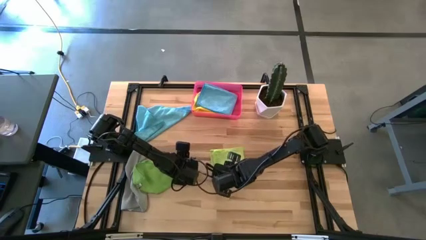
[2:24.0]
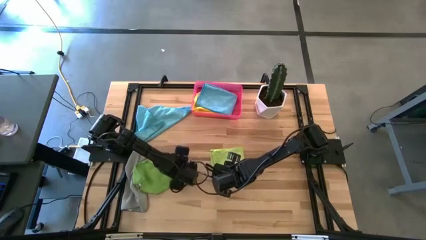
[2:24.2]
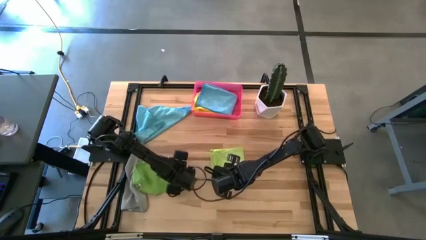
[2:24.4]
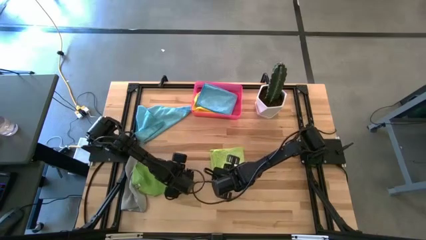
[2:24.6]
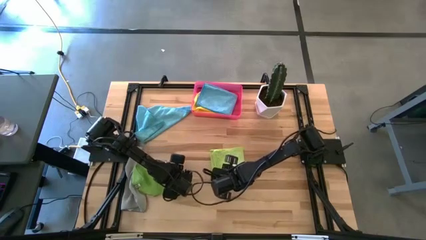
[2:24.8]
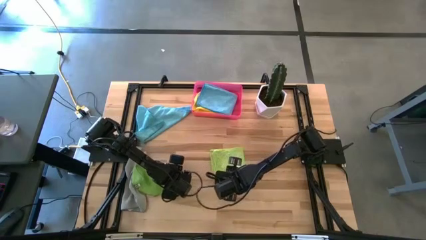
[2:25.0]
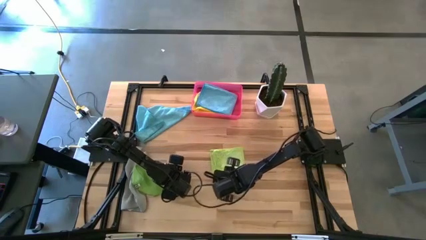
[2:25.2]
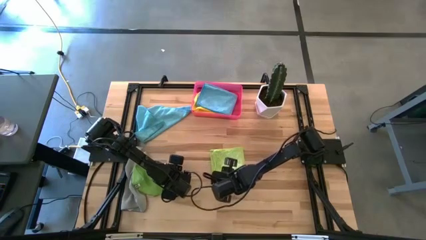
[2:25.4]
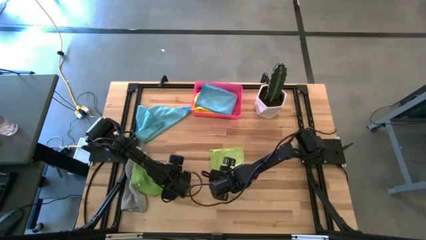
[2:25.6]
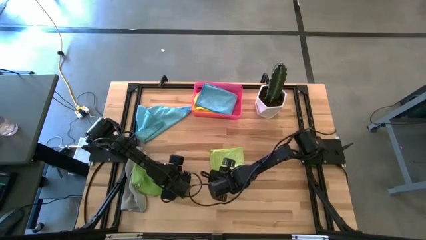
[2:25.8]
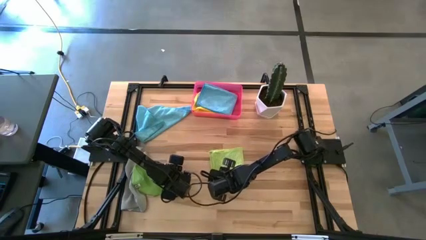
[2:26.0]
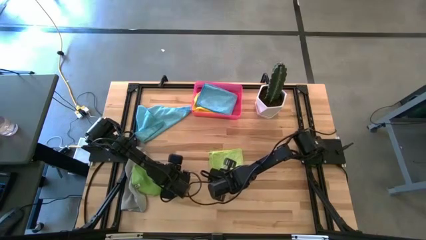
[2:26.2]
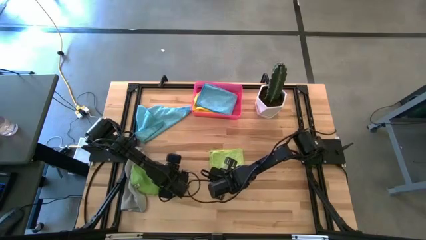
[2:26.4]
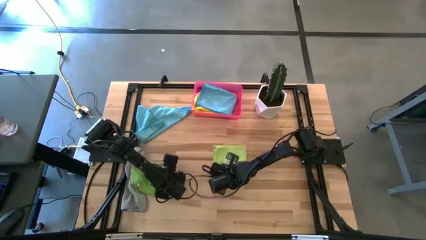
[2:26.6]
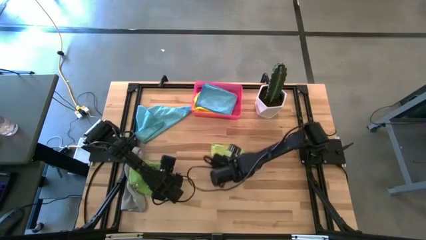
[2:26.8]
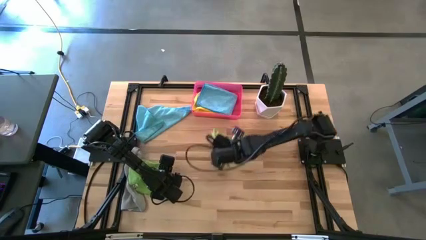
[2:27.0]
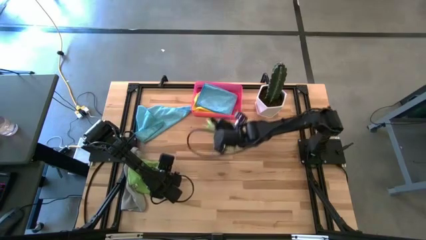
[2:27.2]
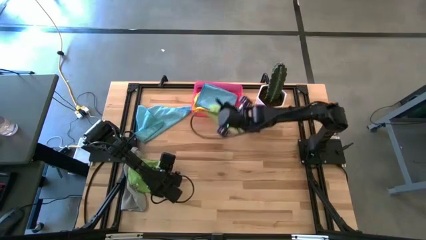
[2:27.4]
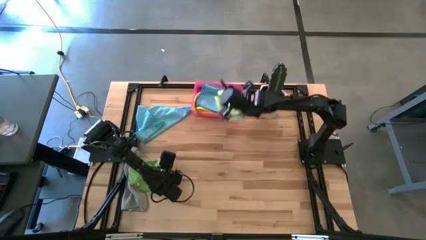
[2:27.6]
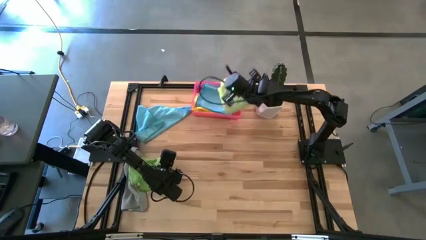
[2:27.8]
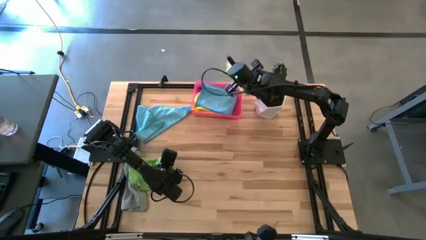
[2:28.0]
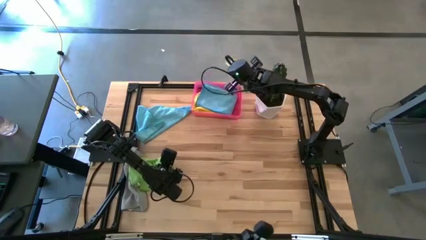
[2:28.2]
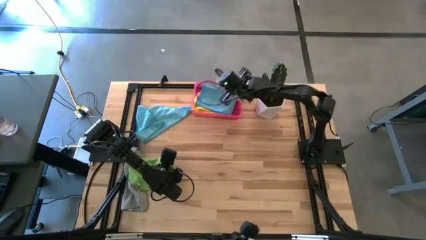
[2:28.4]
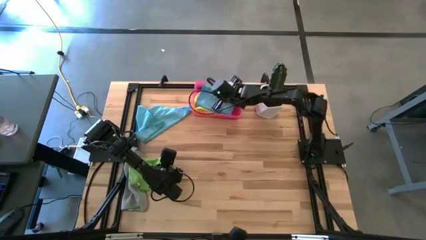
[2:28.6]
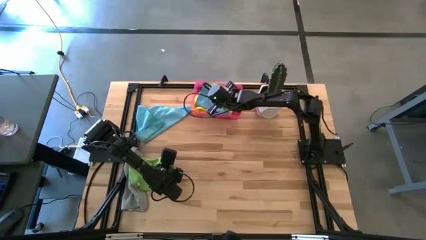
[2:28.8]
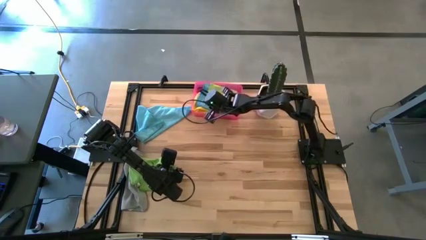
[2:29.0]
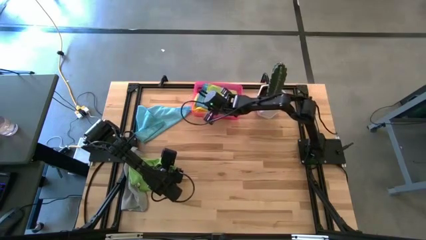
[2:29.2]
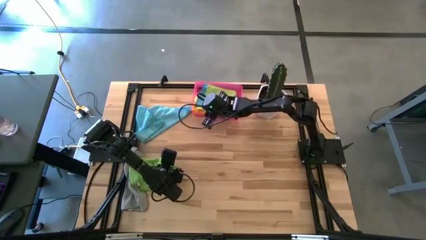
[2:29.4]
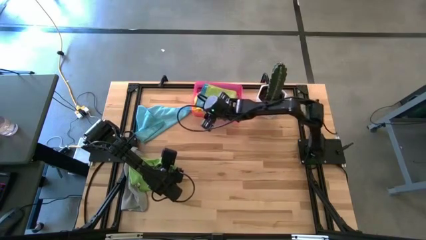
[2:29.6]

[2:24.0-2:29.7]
Task: Fold microfiber towels
Put the light green microfiber cloth into the pink bin

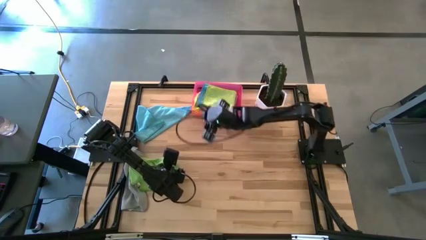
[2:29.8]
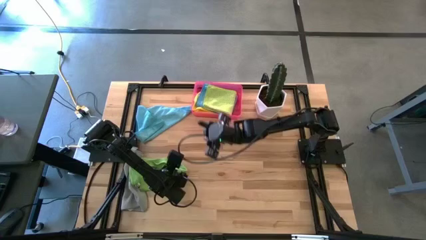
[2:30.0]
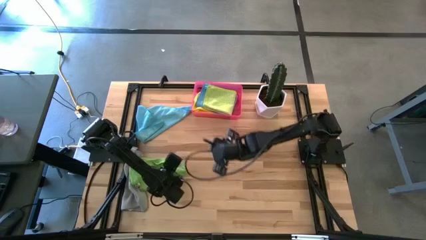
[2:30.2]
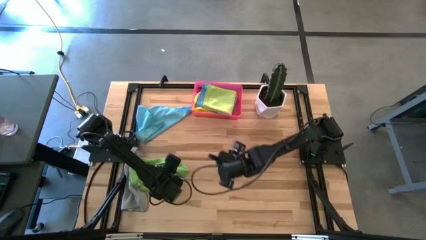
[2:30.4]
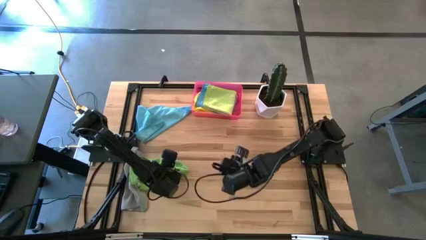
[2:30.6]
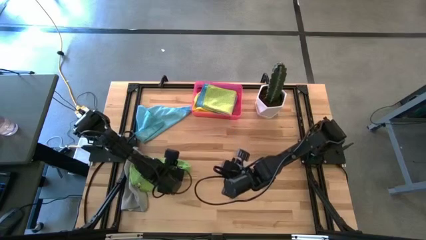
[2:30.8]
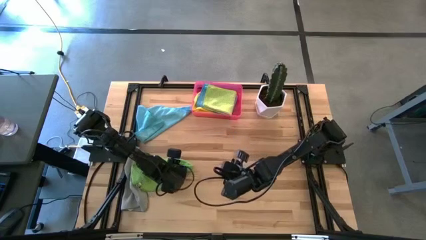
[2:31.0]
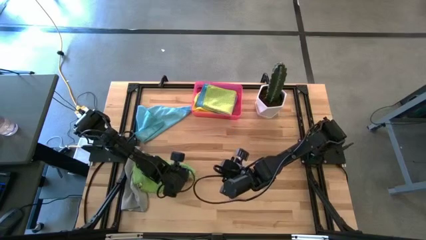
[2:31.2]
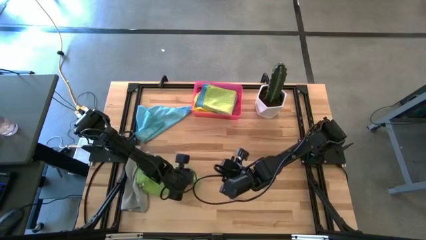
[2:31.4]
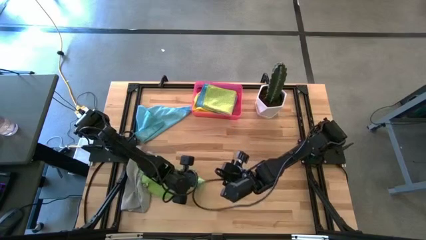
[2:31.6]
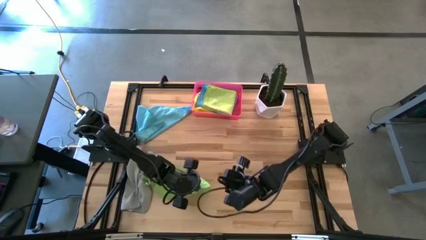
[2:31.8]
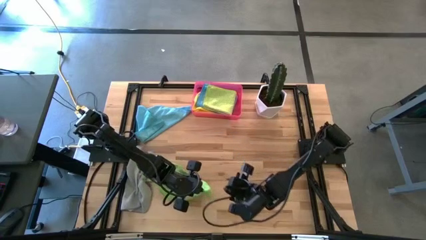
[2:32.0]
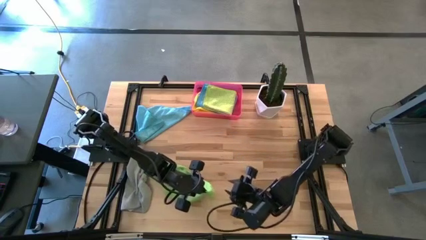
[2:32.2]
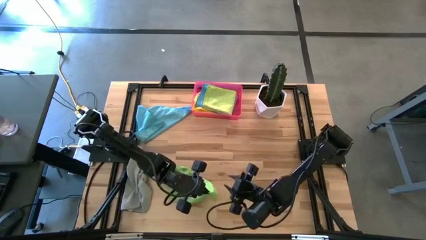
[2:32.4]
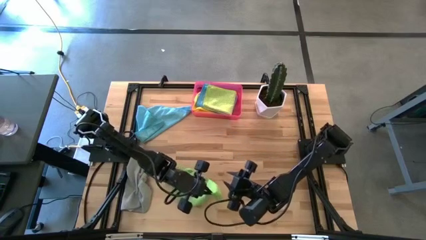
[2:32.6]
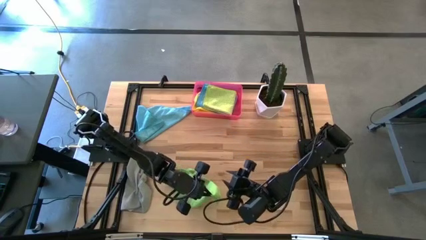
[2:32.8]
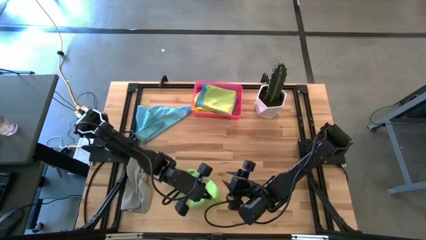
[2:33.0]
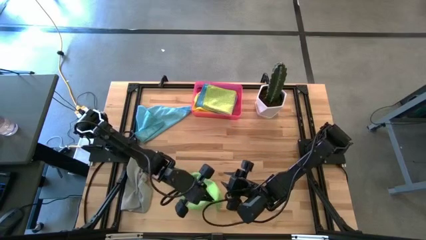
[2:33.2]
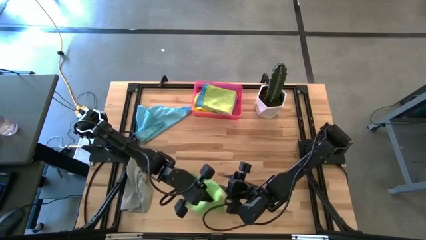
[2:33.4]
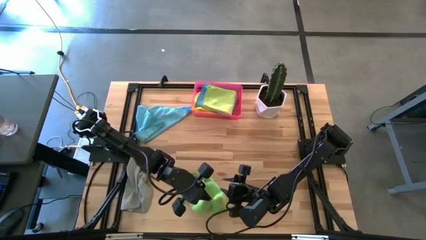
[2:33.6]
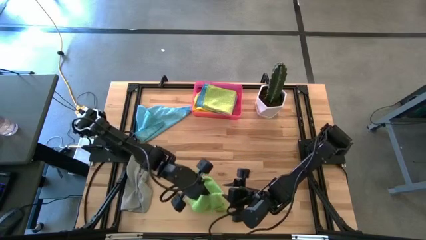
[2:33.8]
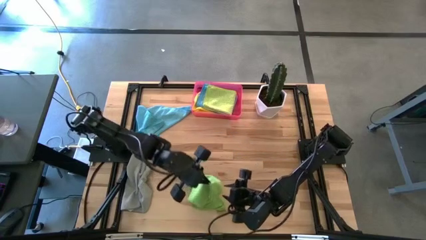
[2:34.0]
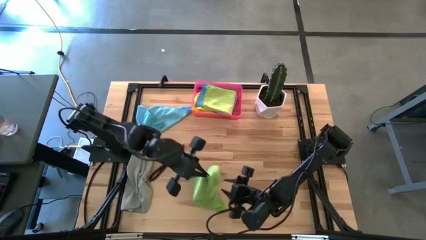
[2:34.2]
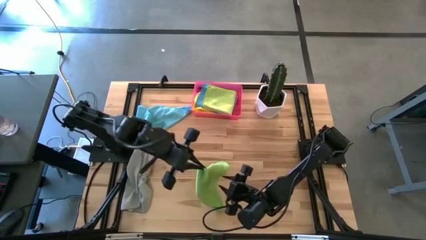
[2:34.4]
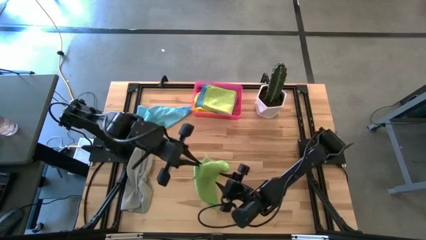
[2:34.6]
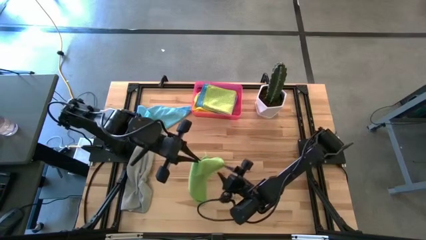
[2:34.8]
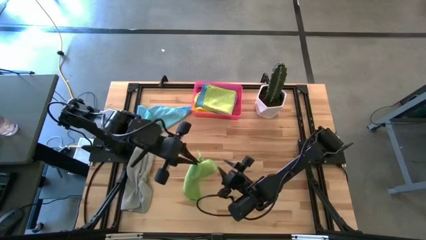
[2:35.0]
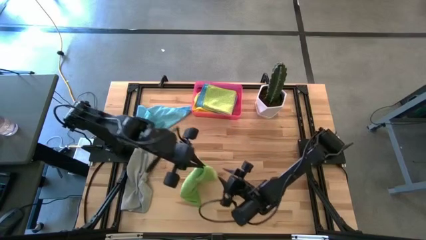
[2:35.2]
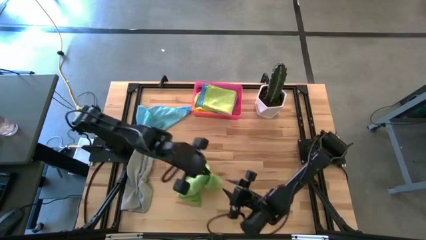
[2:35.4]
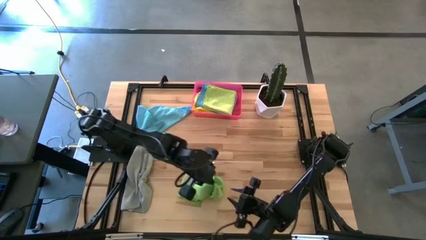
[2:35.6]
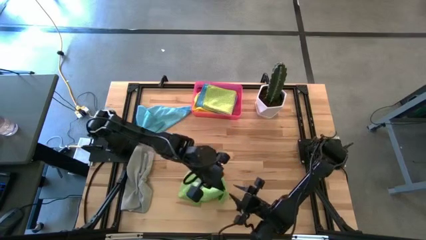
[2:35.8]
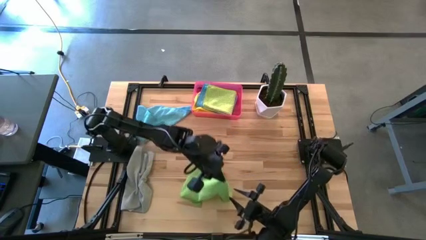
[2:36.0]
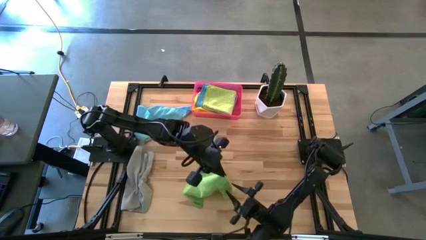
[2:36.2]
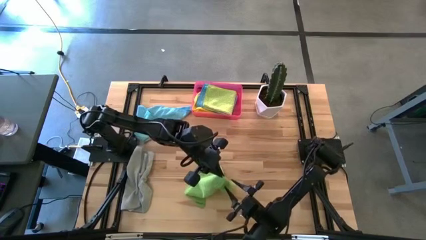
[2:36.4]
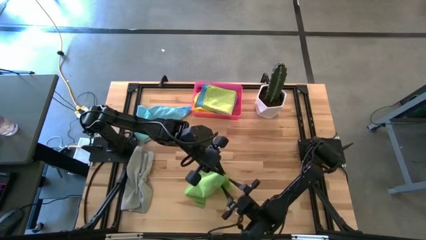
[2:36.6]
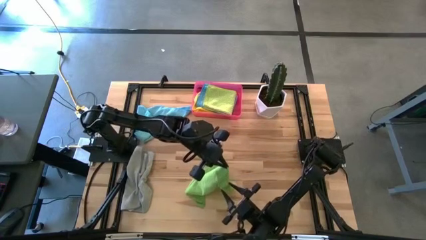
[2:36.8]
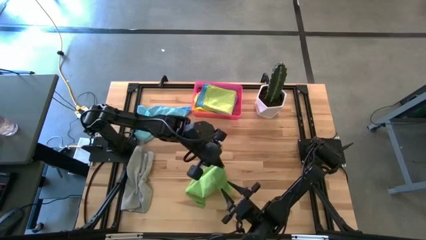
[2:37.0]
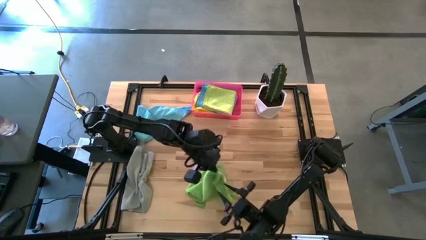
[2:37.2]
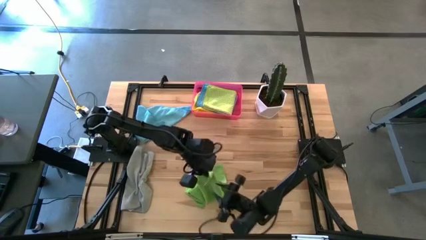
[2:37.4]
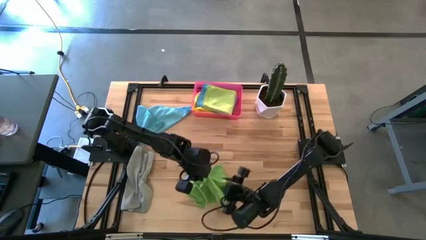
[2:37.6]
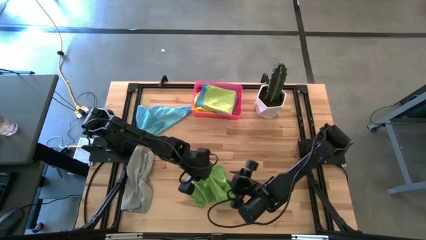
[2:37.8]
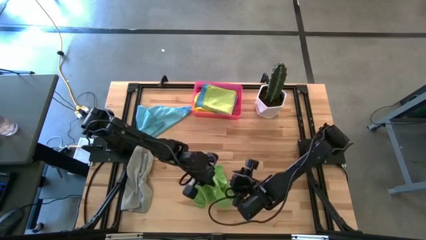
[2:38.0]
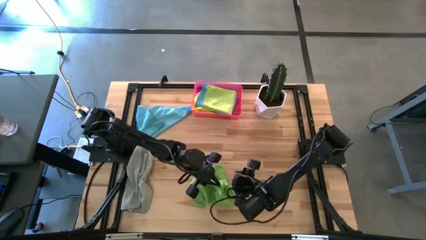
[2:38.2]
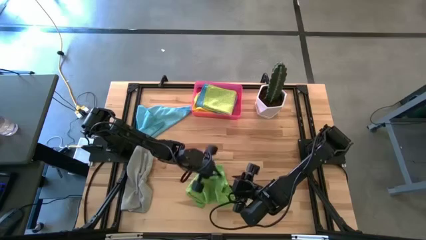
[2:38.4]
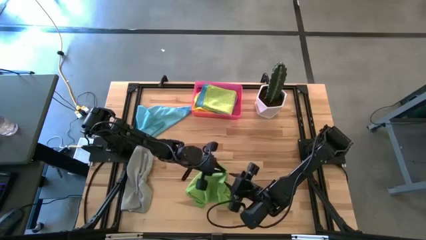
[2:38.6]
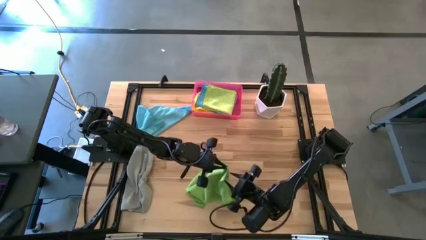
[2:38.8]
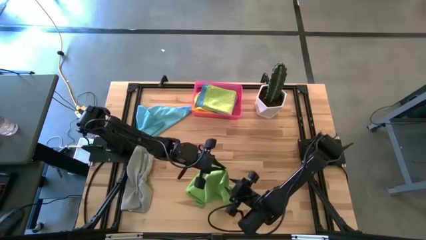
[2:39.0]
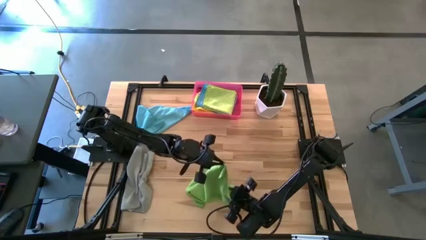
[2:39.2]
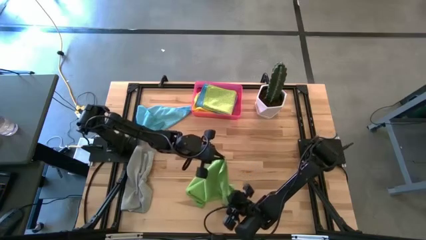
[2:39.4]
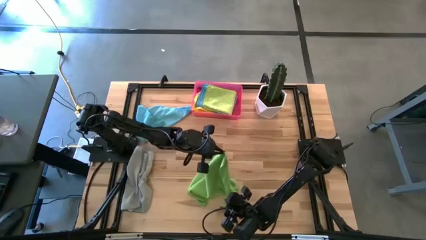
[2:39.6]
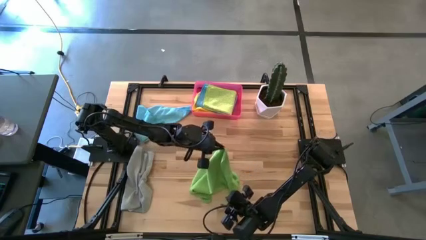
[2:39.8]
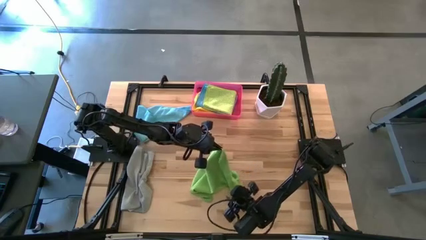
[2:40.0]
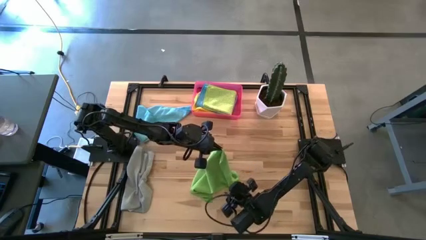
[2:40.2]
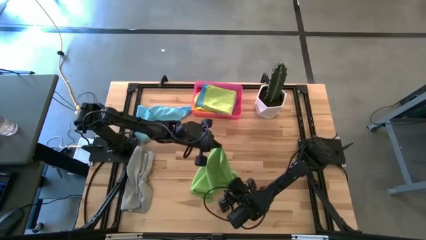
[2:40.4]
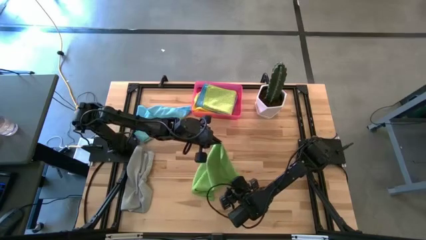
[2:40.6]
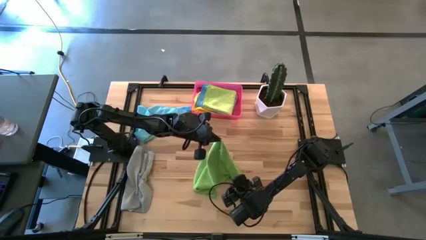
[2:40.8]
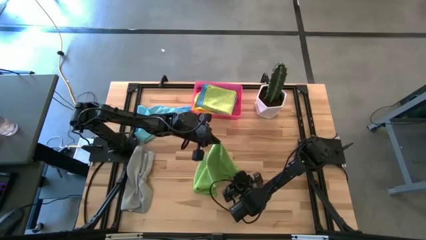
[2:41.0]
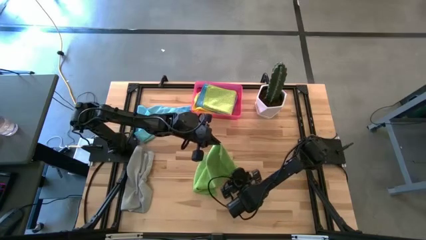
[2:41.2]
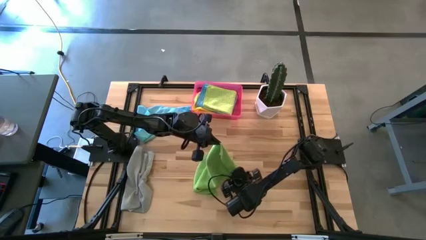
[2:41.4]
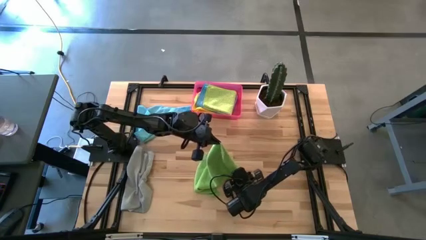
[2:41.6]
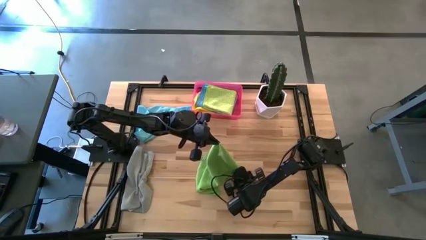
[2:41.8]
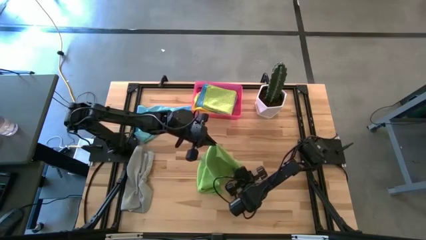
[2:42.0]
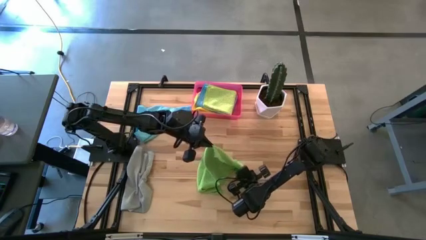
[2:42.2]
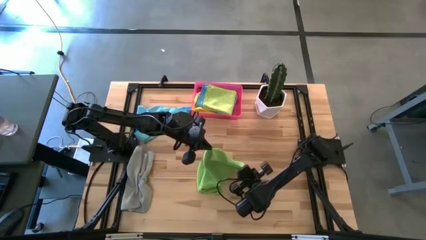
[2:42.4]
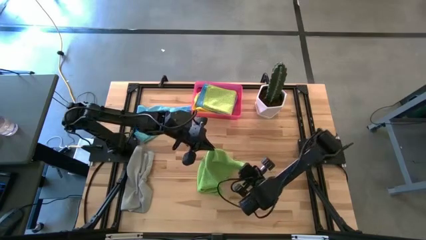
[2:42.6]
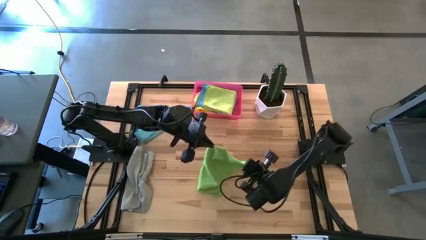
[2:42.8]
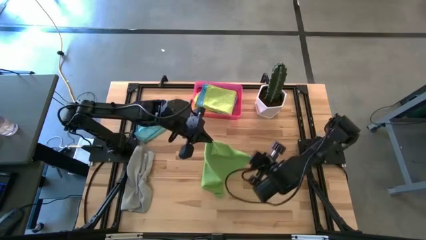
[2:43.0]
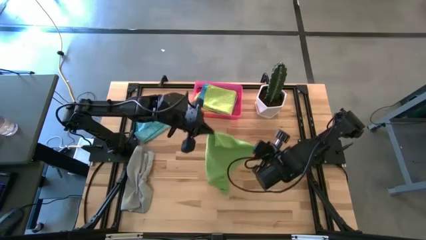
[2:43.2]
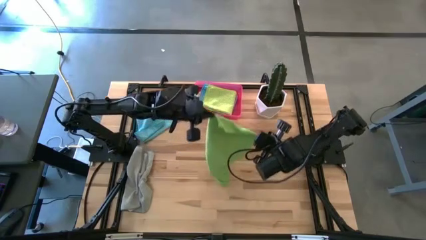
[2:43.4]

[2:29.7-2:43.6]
Fold the green microfiber cloth on the table
